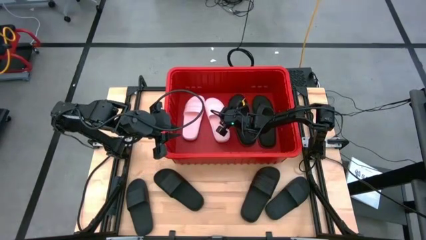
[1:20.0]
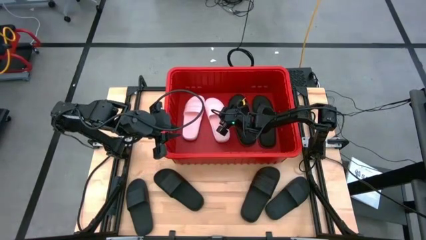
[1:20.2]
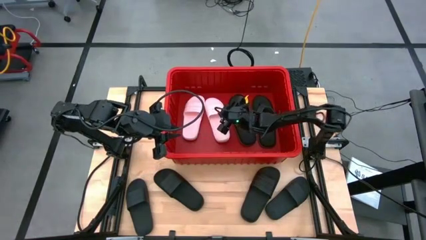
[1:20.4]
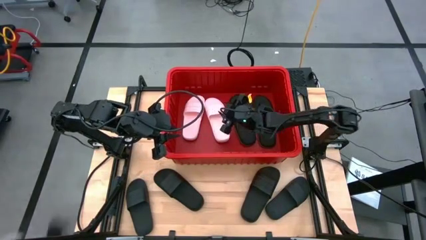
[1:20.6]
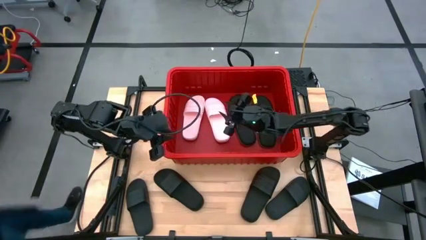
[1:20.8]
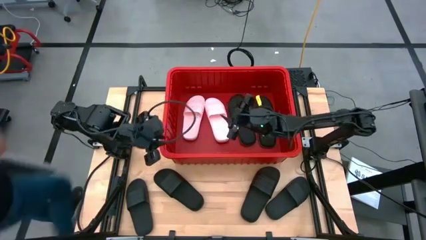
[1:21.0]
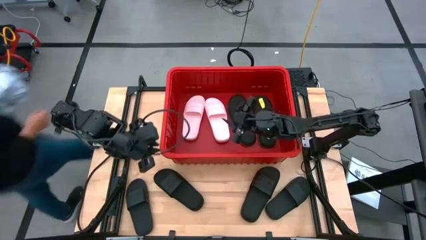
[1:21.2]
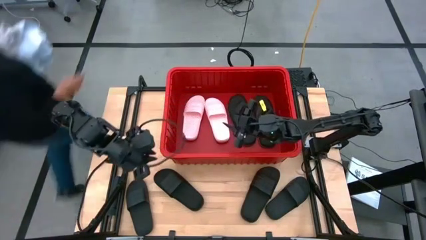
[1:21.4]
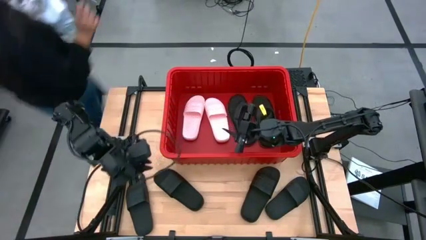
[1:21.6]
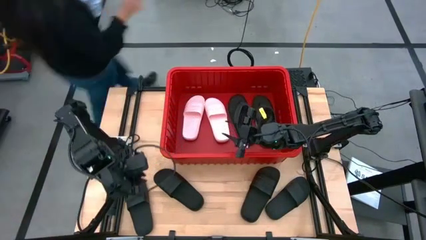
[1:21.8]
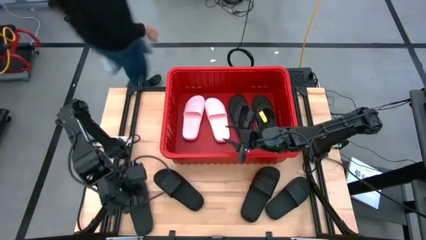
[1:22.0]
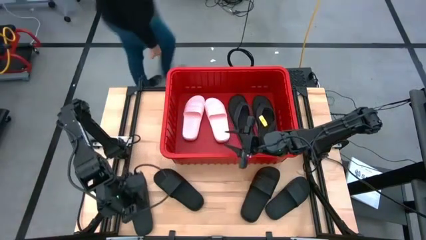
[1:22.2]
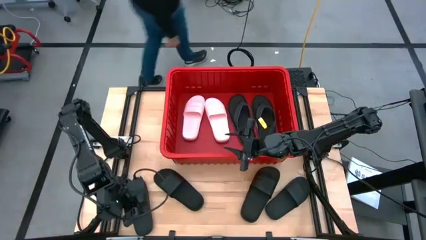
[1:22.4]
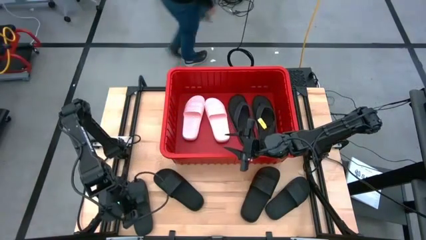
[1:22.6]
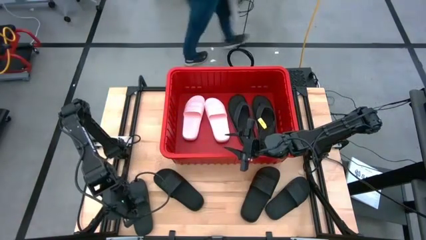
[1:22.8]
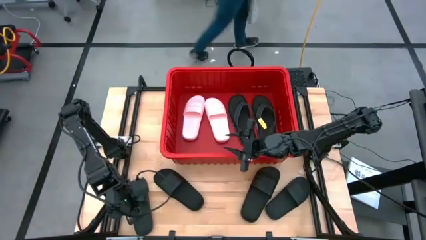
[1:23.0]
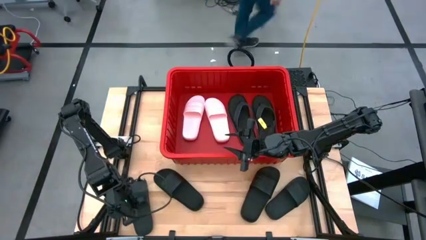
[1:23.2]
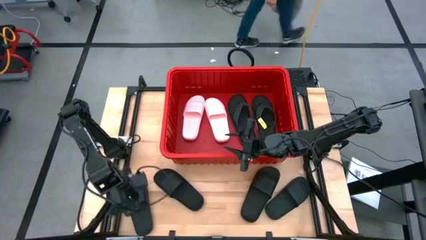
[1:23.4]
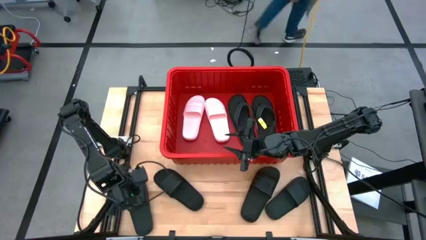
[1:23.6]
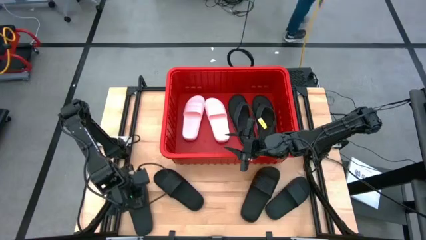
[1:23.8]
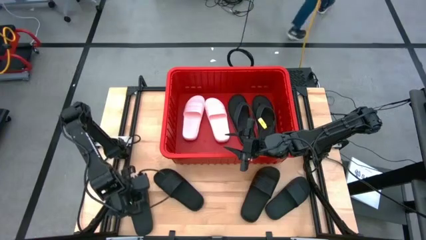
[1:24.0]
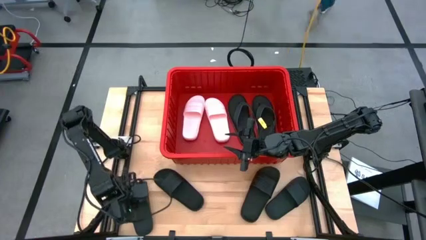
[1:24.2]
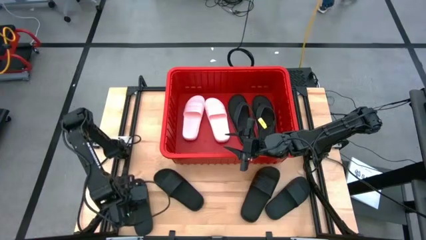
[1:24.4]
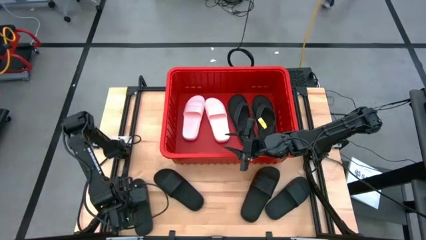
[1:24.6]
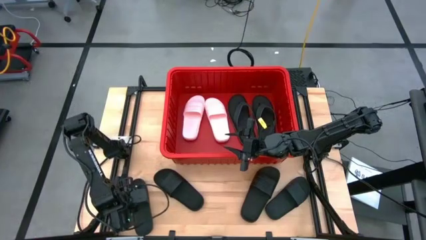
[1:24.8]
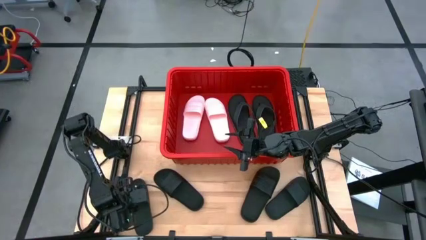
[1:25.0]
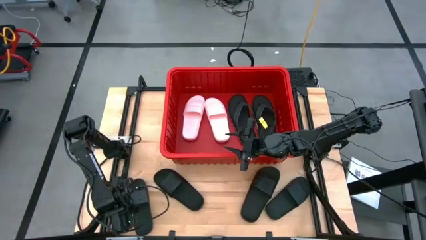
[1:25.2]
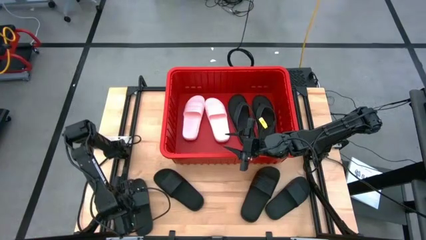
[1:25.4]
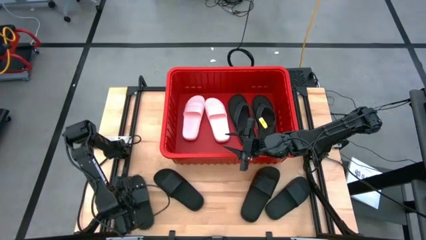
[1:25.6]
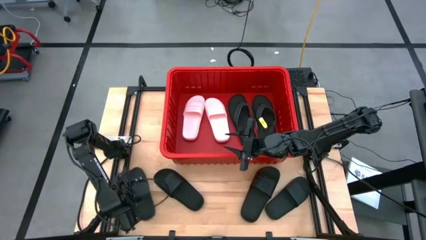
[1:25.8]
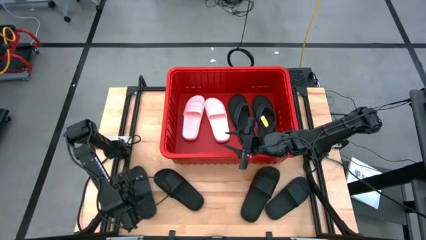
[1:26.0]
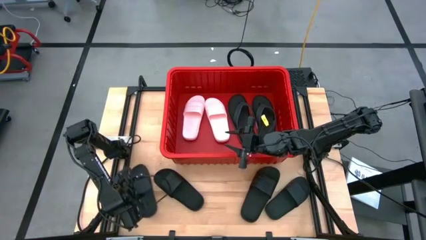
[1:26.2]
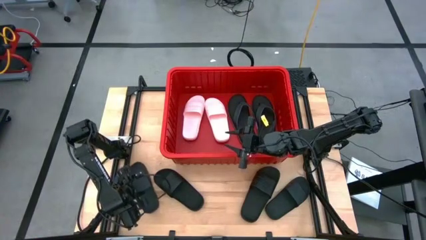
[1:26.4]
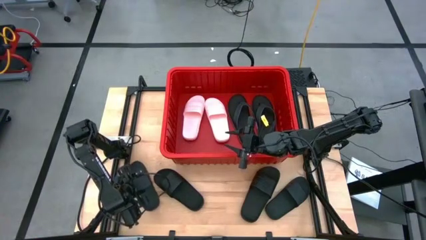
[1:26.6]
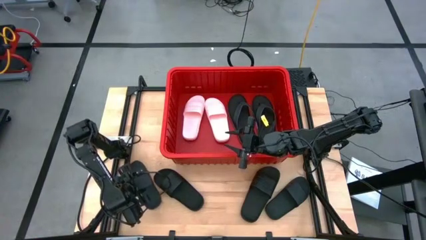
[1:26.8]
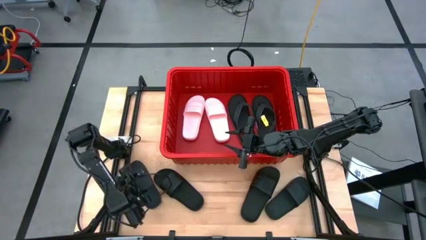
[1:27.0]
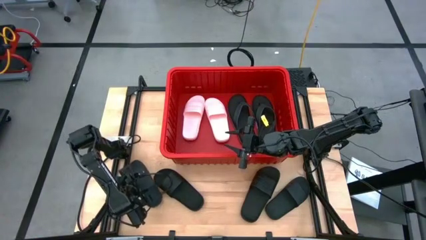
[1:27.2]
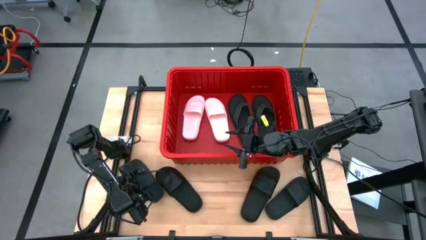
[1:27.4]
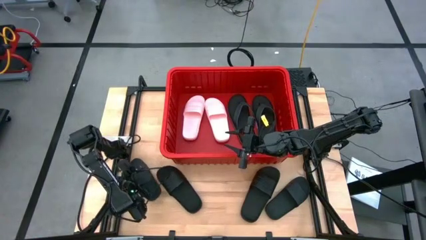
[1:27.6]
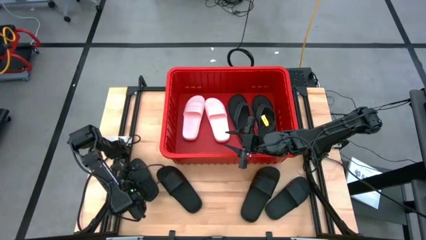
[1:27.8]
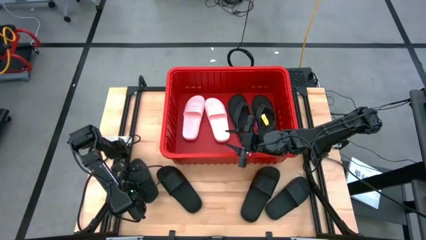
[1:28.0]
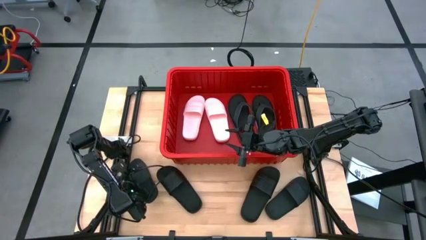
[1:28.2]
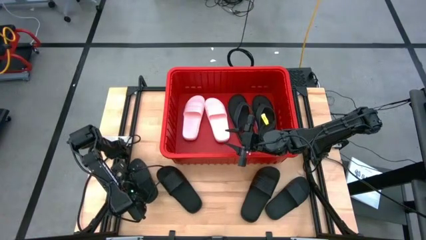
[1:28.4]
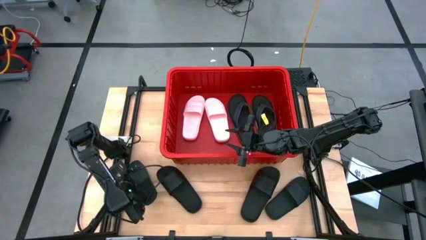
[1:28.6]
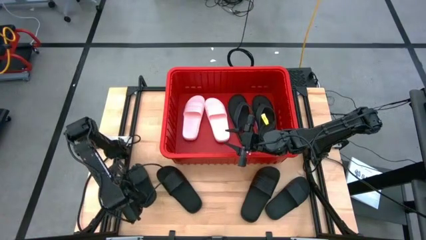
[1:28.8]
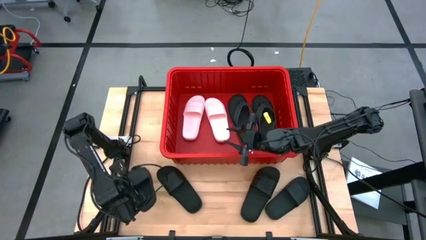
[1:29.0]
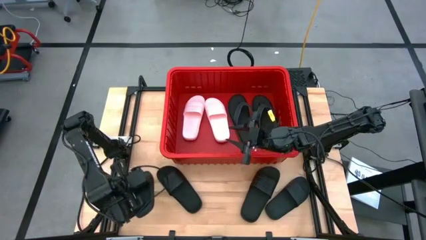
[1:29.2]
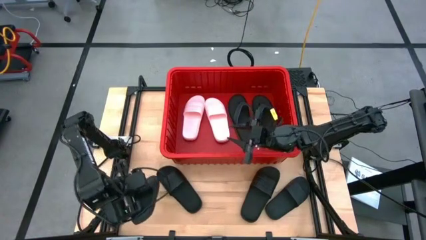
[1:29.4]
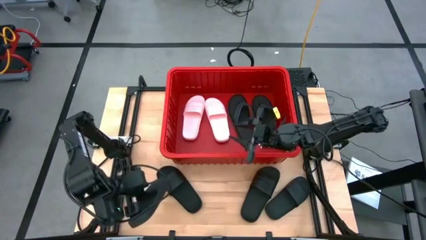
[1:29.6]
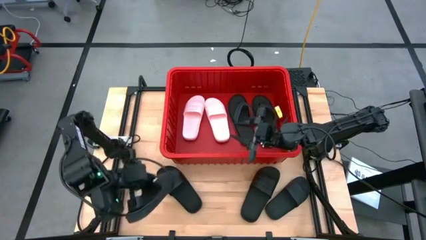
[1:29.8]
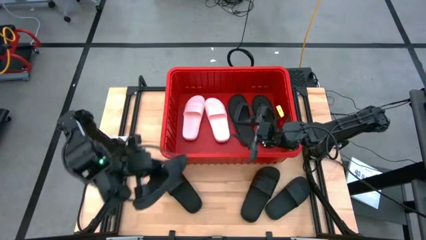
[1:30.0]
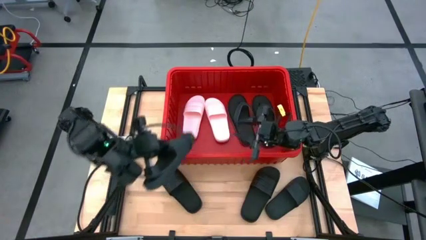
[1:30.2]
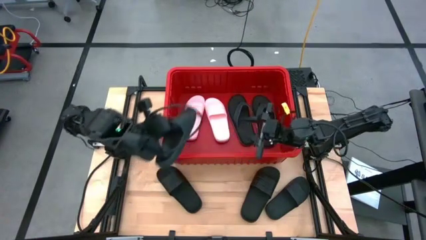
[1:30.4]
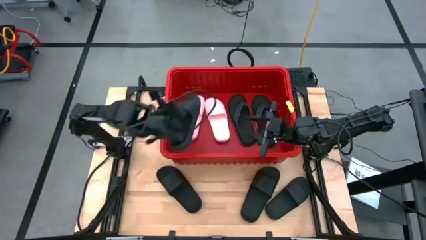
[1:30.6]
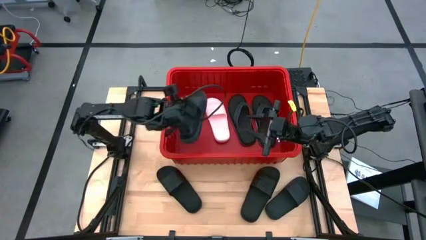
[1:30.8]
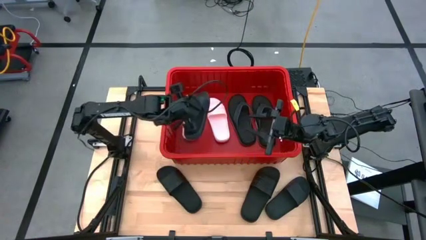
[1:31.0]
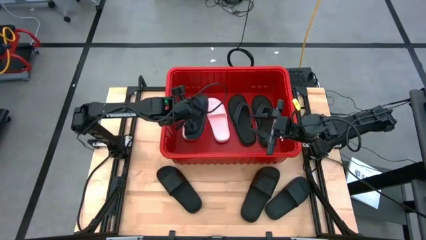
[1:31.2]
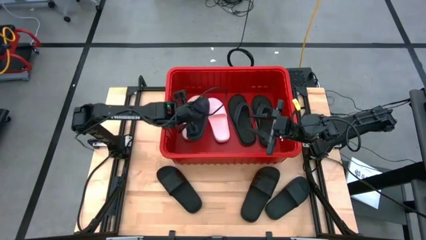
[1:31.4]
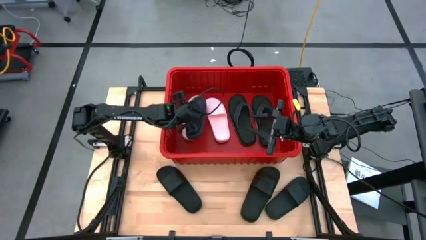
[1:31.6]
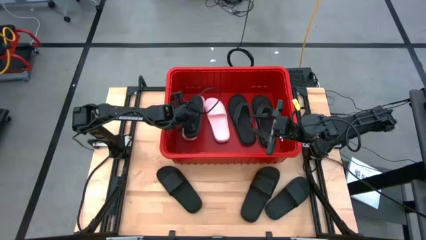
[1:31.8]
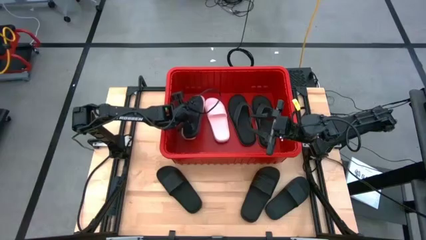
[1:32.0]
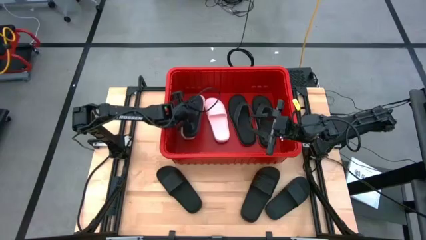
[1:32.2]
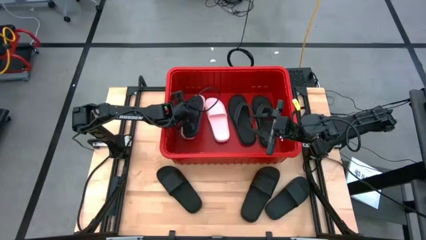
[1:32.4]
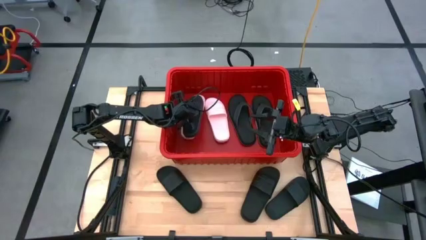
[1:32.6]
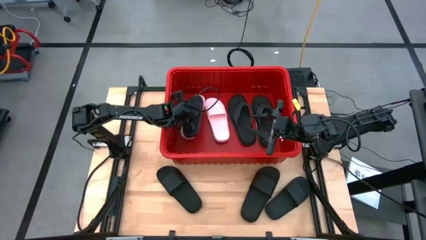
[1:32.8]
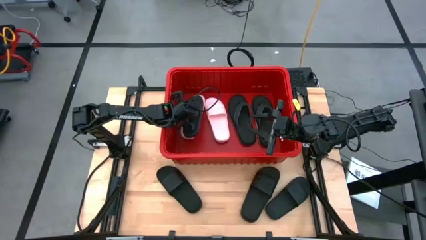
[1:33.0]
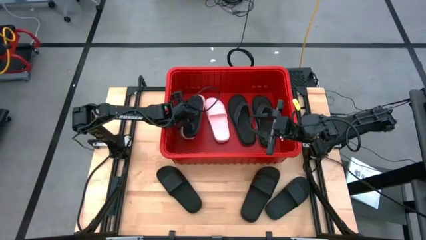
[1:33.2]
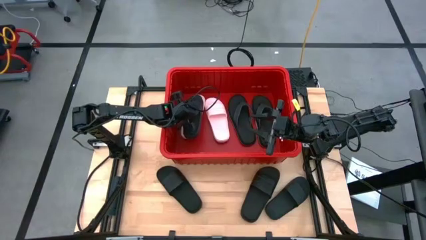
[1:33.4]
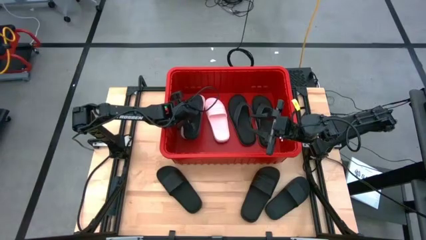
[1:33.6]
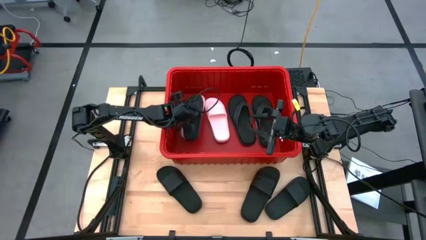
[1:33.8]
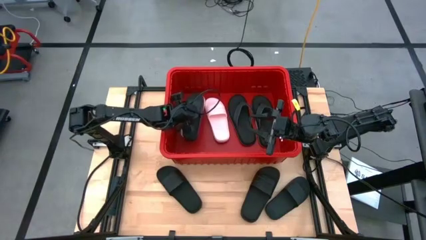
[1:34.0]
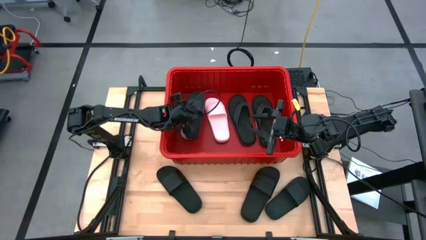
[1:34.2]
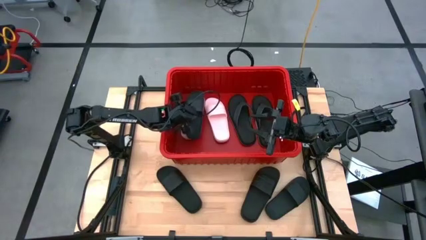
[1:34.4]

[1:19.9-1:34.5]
Task: Pick and place slides into bin
Put the black slipper into the red bin

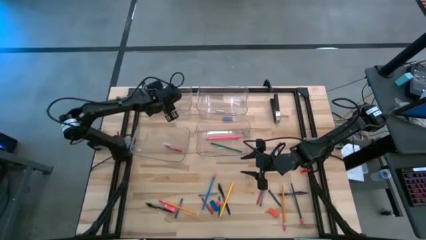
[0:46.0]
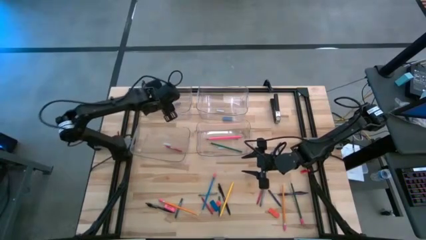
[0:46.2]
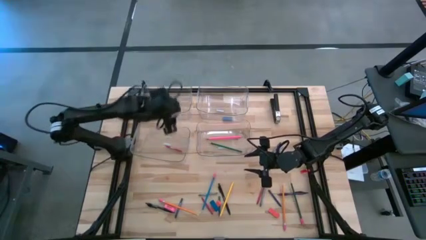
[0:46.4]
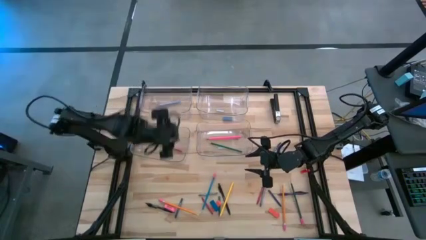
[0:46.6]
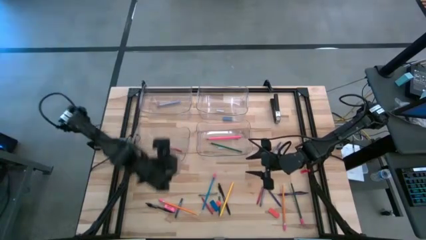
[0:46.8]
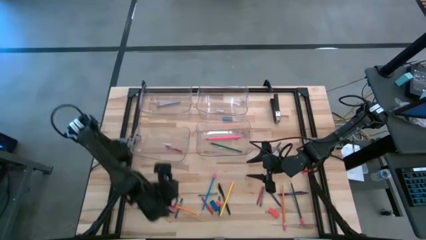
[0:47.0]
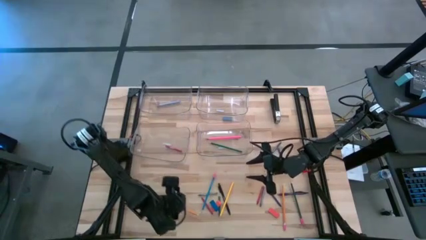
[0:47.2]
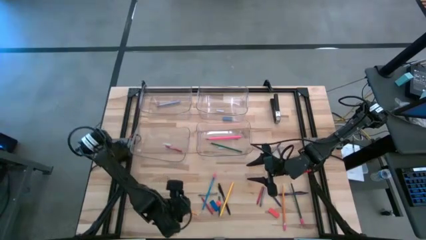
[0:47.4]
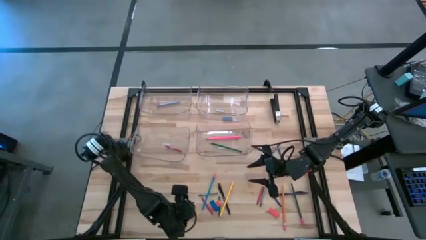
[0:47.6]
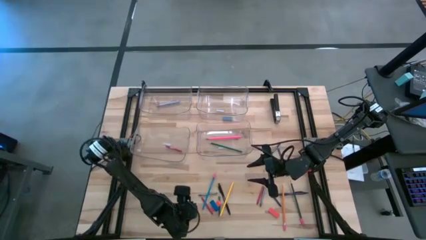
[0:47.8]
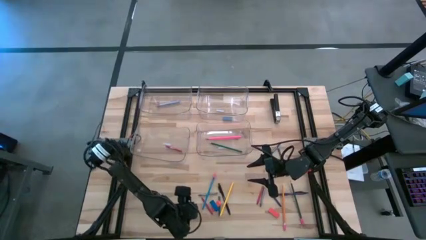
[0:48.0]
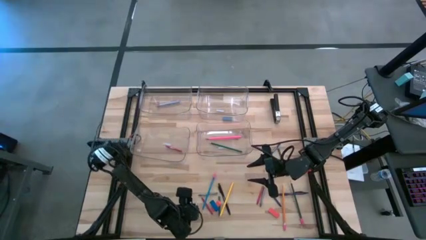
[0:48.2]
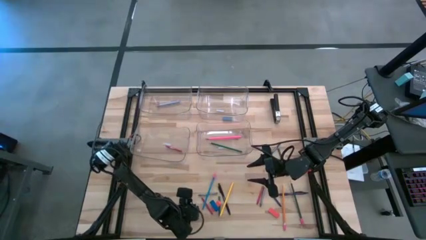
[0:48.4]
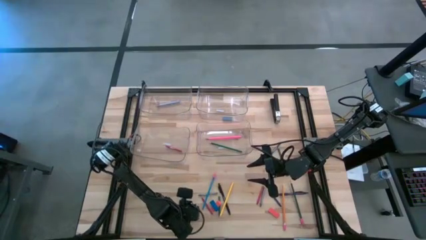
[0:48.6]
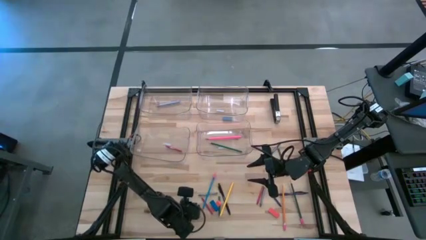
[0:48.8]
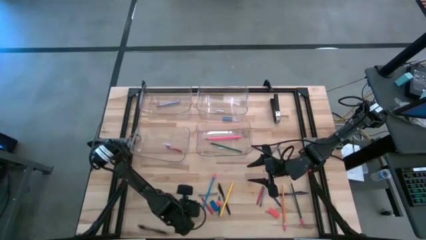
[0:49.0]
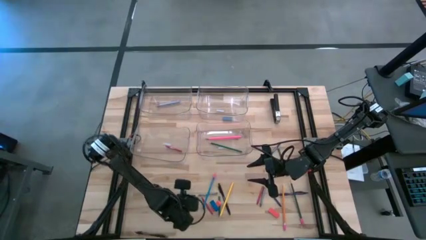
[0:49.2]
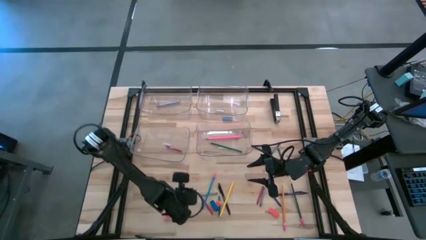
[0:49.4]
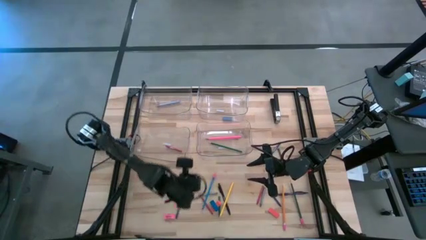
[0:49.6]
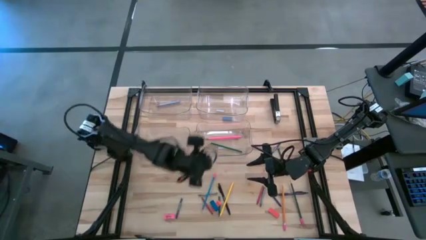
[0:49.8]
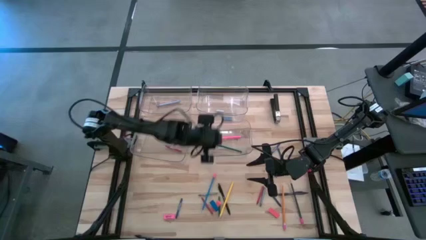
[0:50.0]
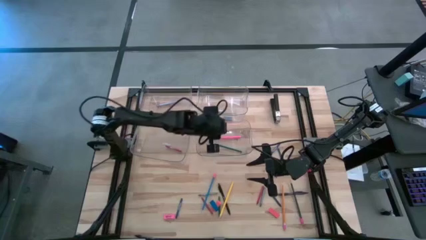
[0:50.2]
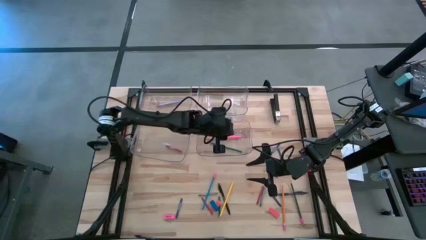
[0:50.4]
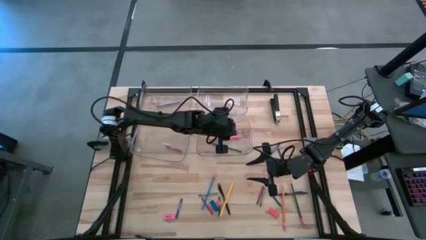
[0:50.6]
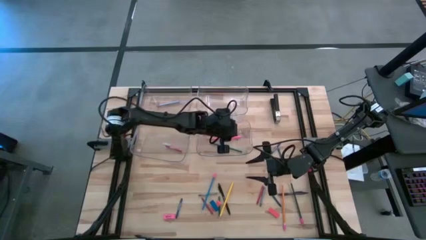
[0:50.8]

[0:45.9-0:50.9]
Task: Sort crayons/erasers/pens/pencils in bins
Put the left orange pencil into the bottom right transparent bin
